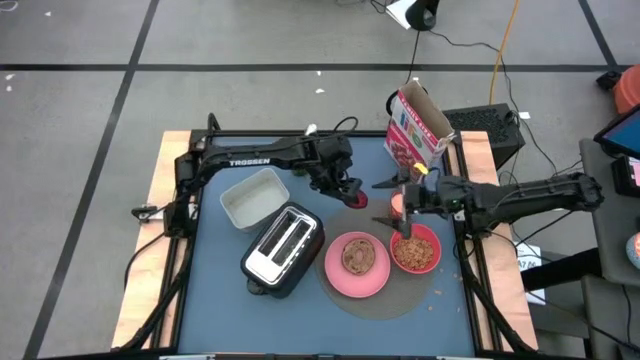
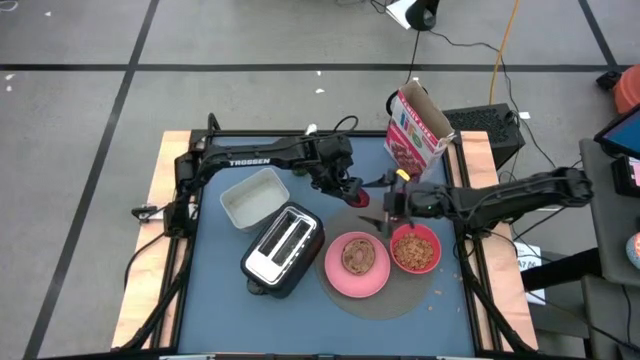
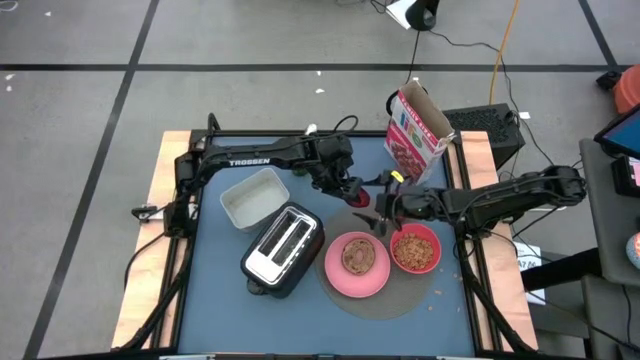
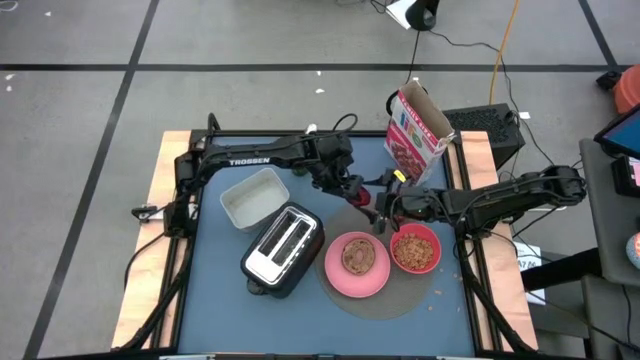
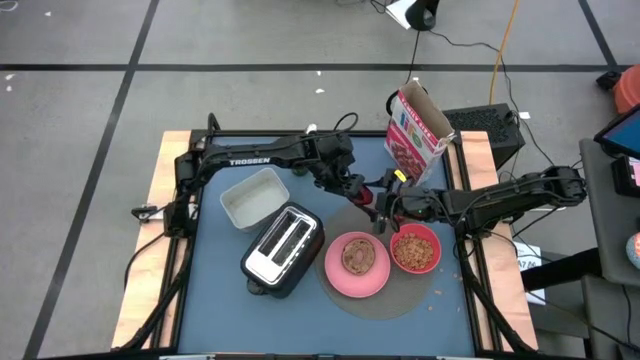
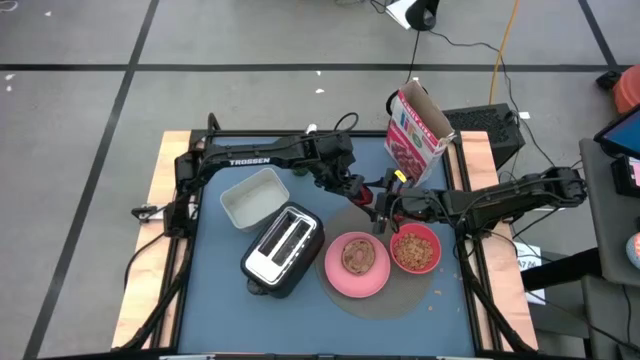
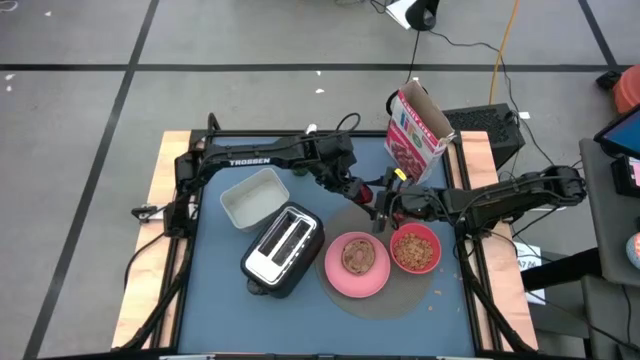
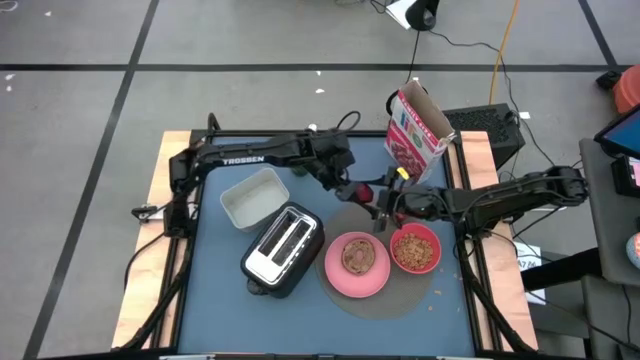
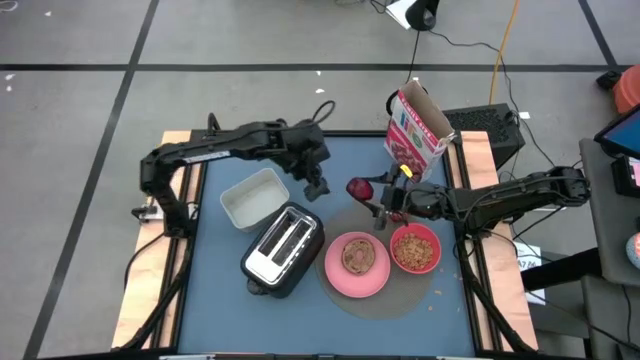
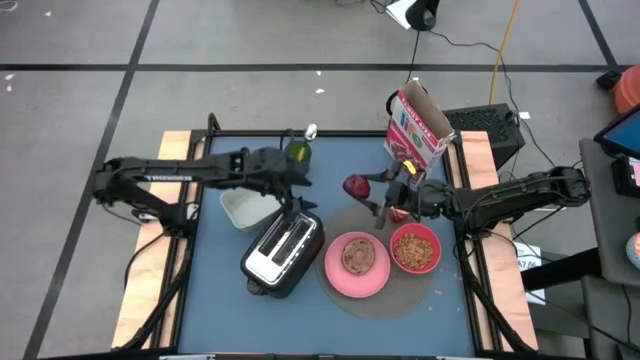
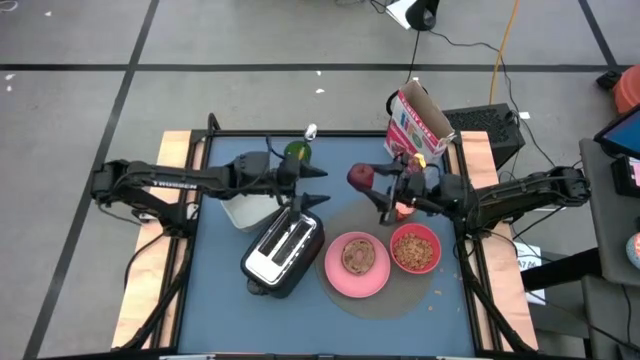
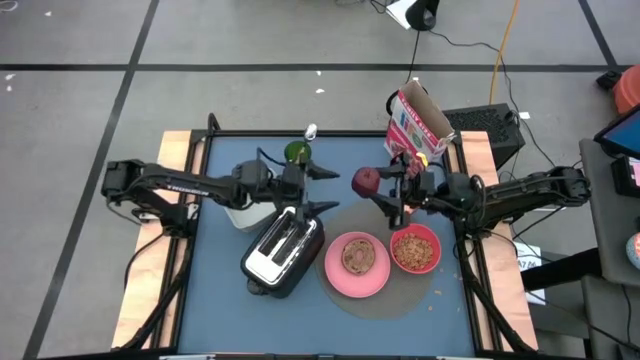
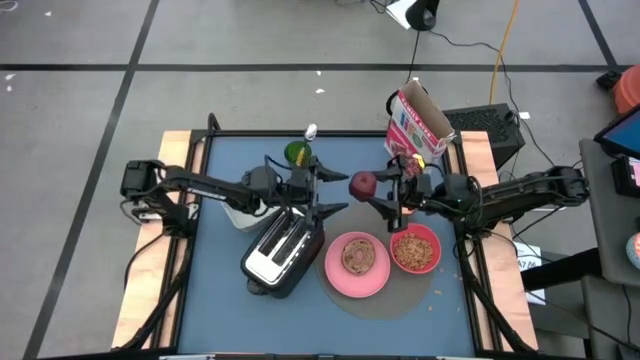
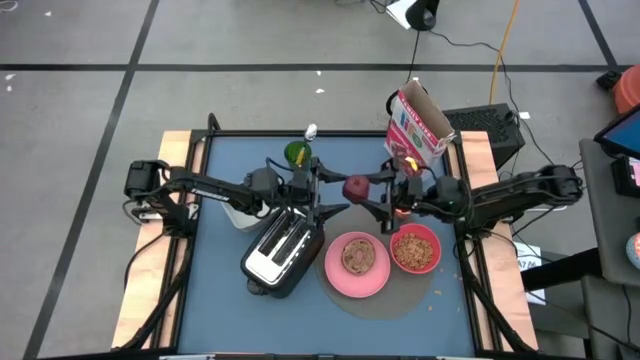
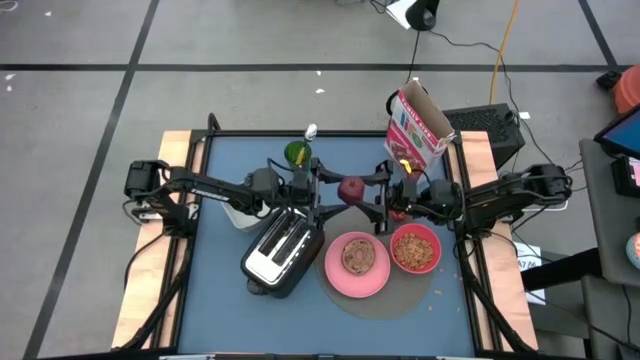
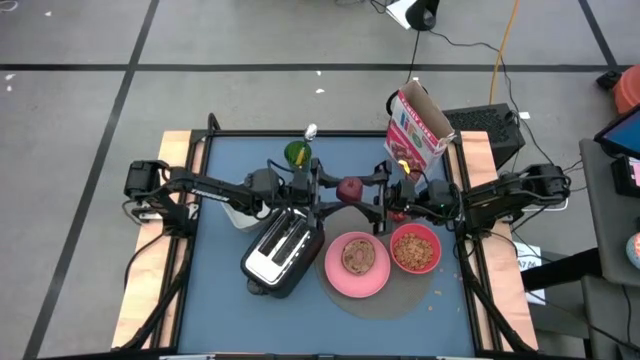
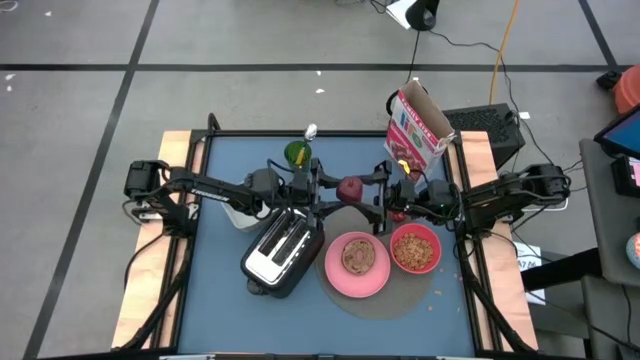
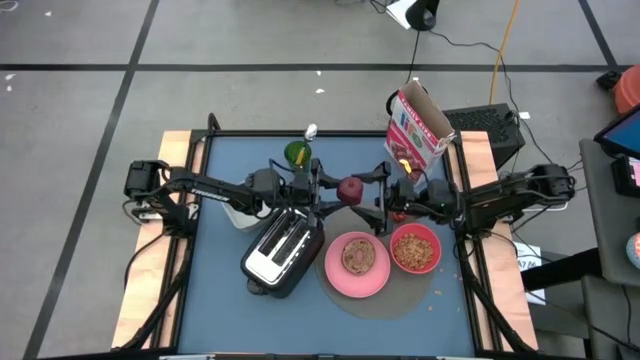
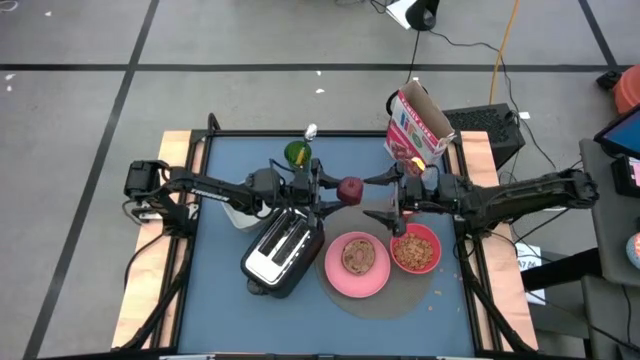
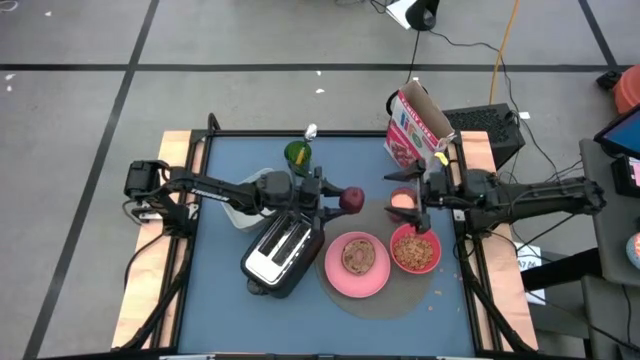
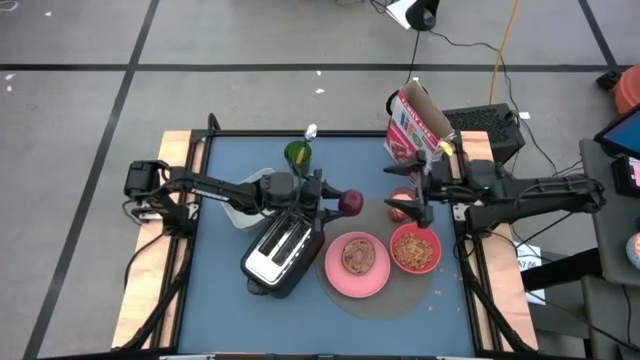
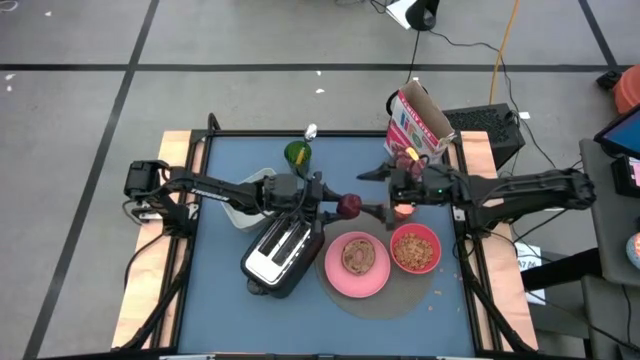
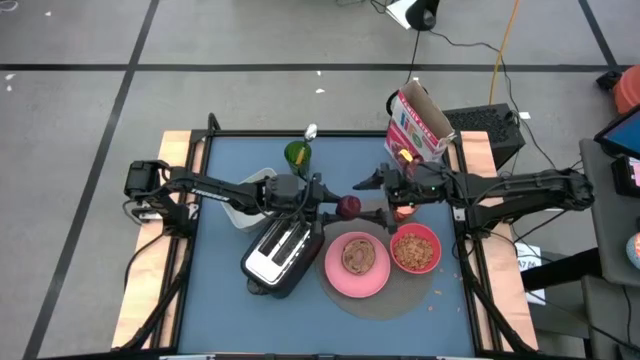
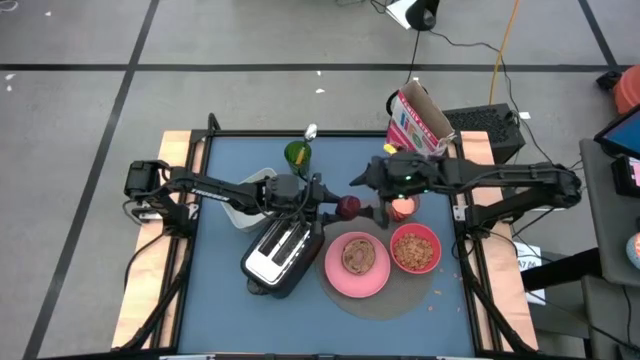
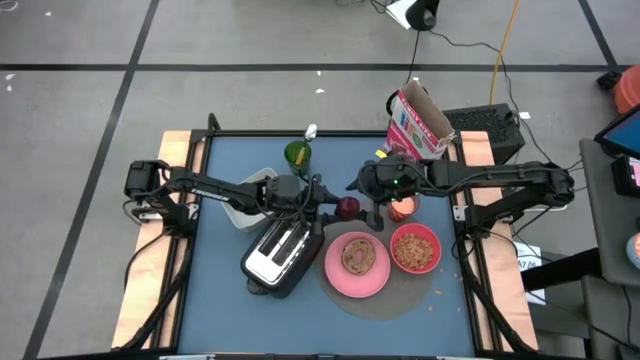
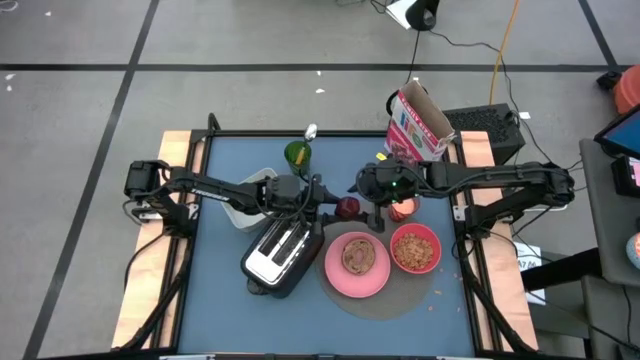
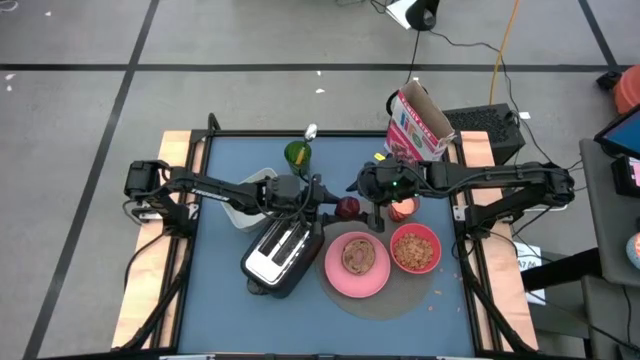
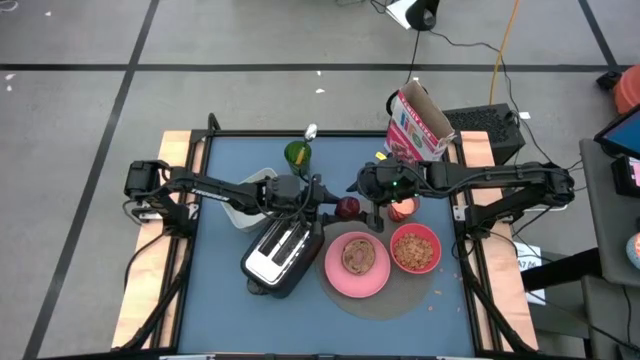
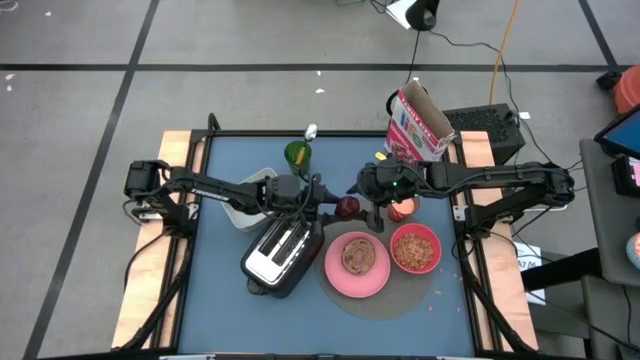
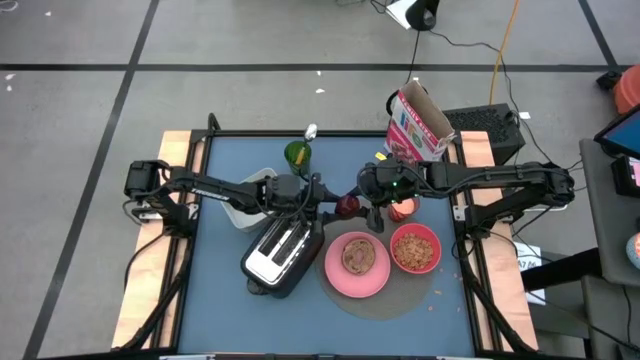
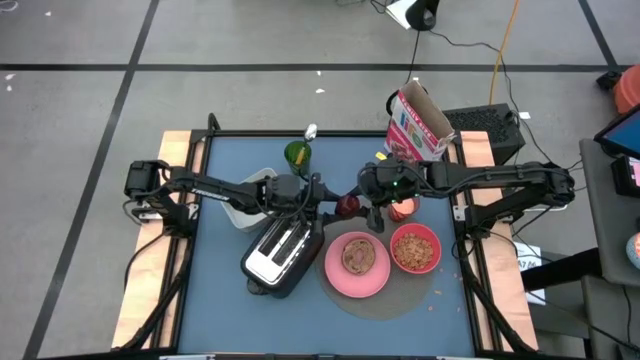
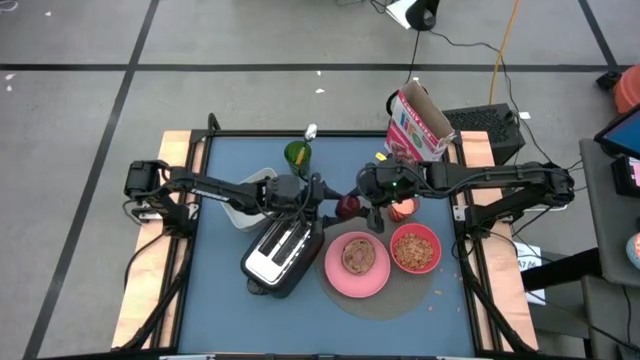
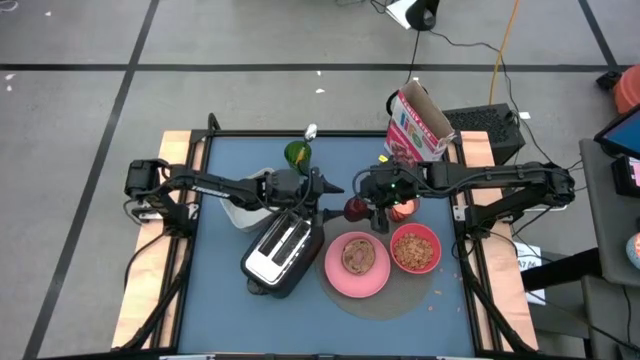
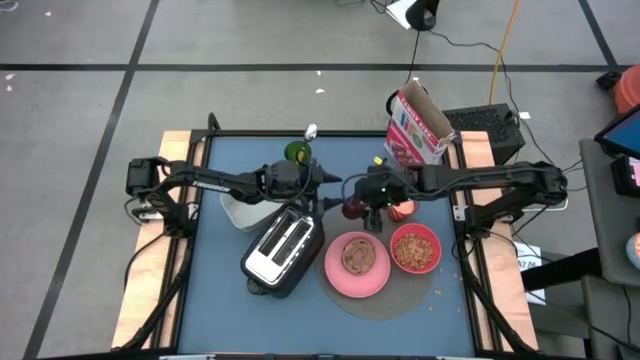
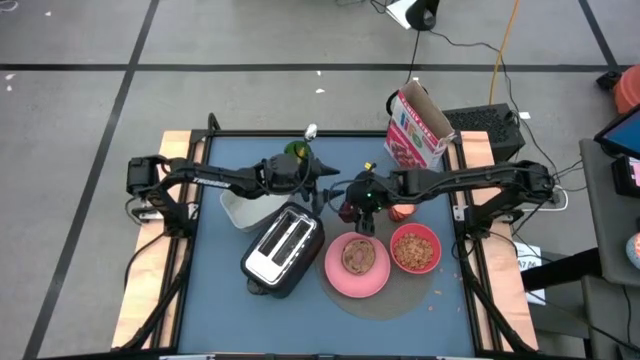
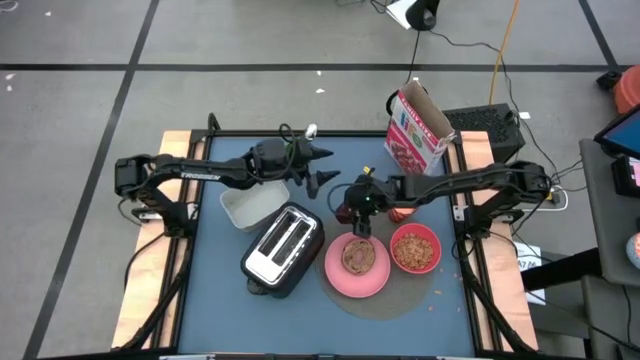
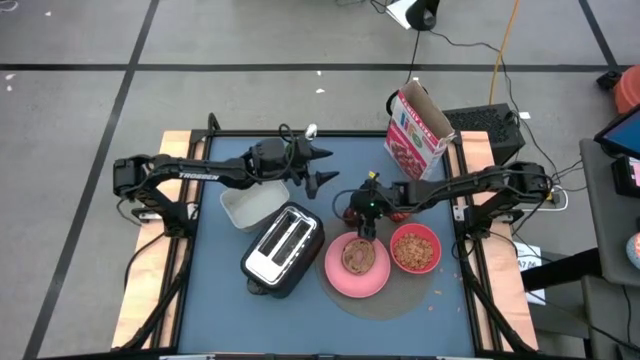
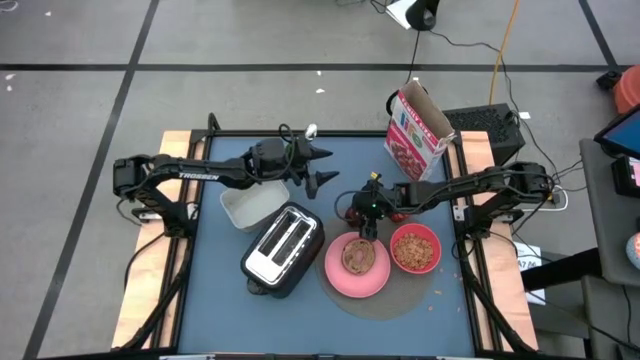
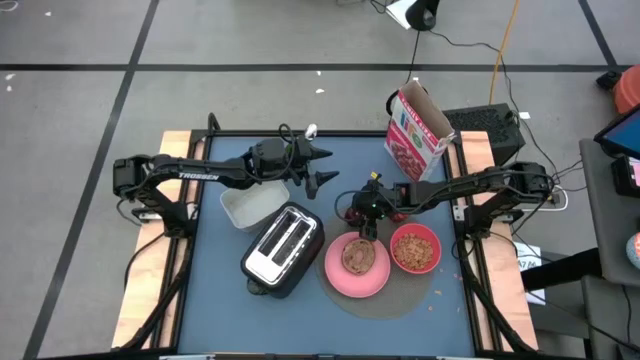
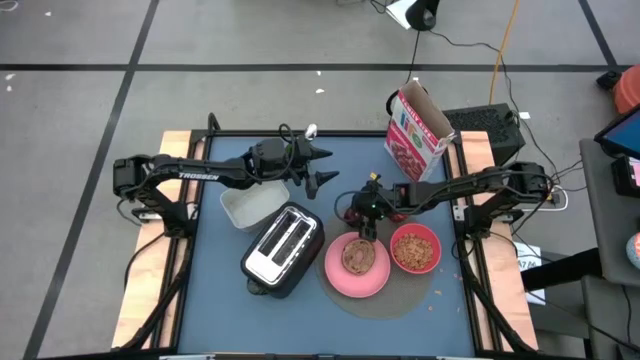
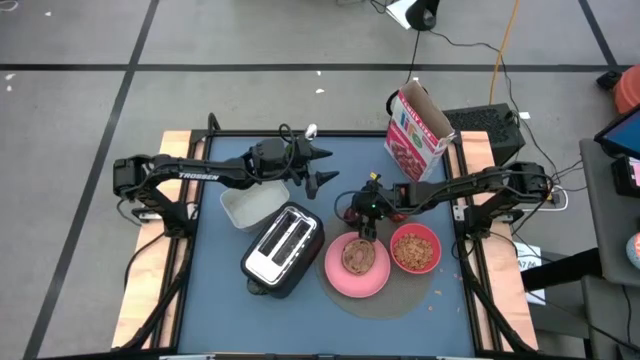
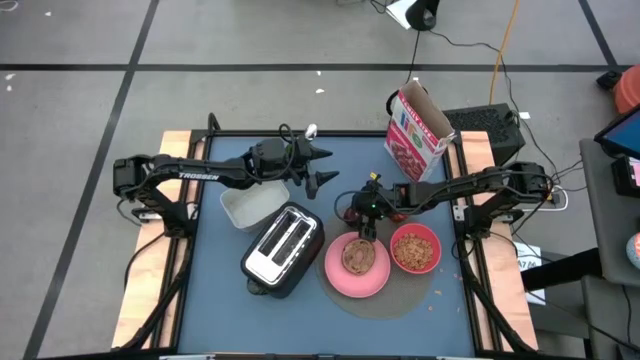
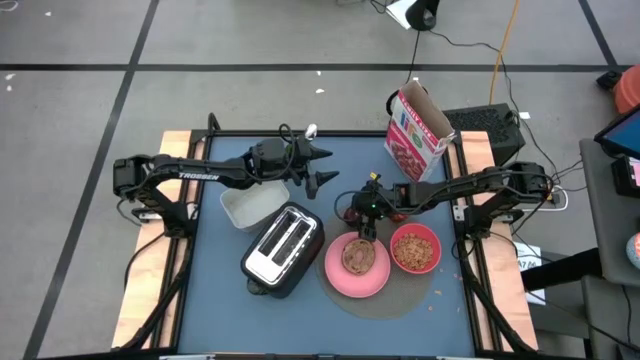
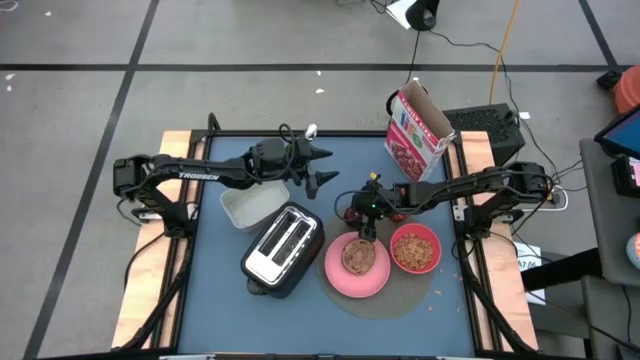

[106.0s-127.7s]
Task: Arrange a breakfast setting
Put the apple on the placemat to the top of the pink plate
